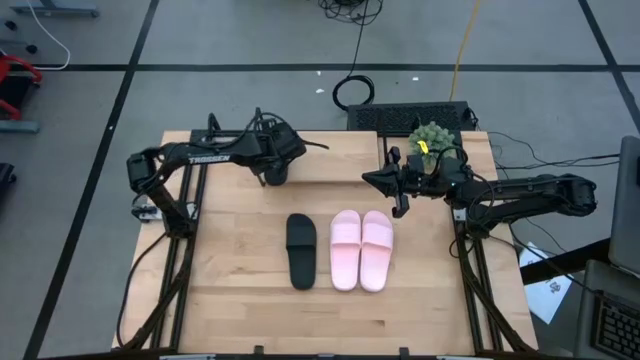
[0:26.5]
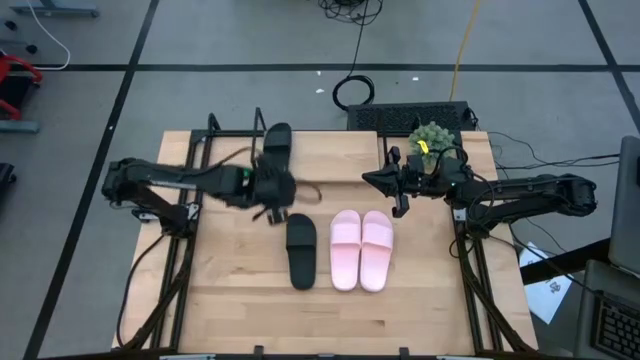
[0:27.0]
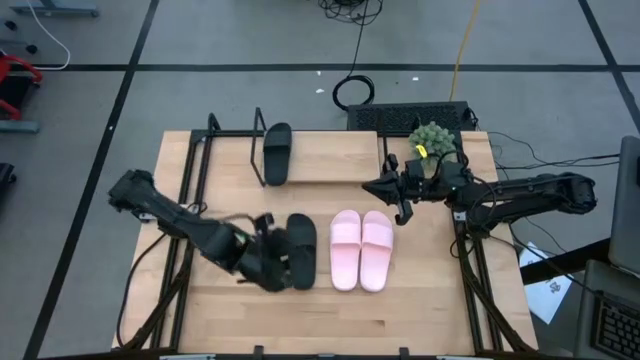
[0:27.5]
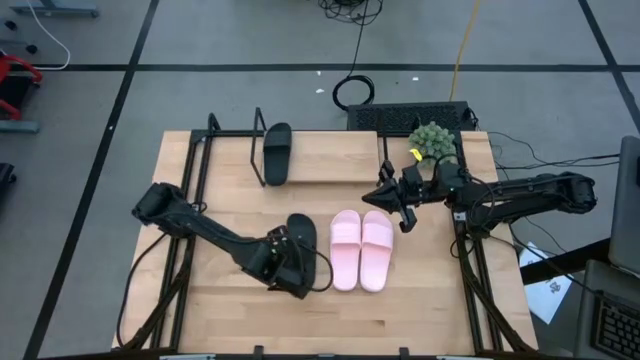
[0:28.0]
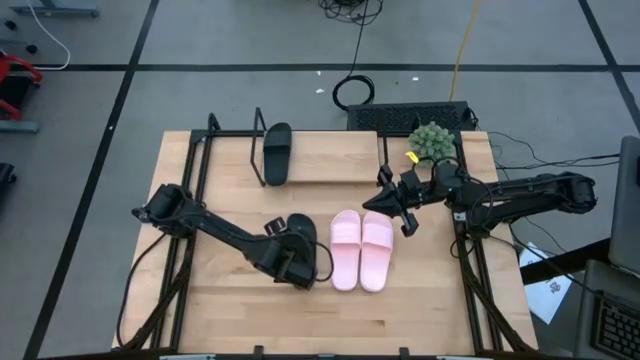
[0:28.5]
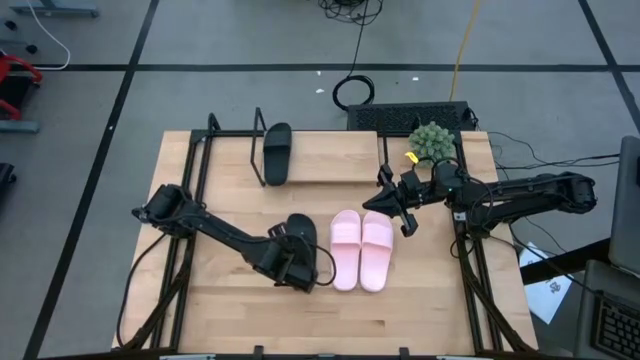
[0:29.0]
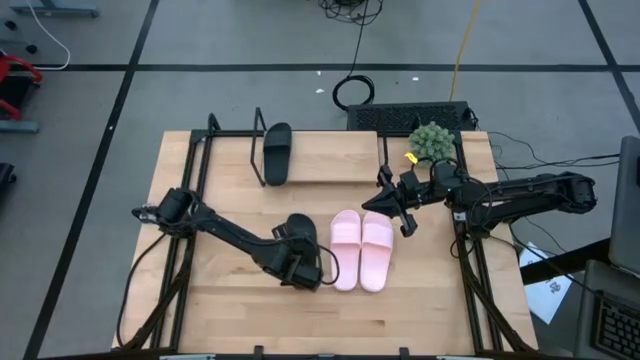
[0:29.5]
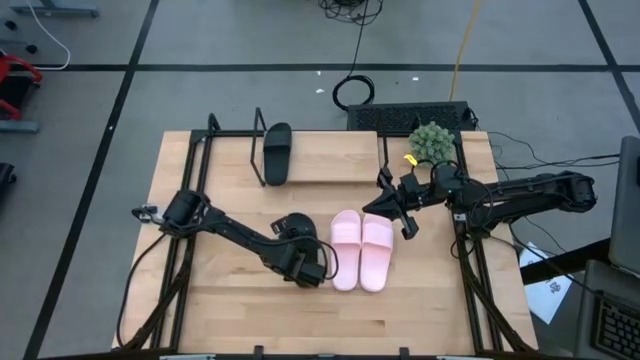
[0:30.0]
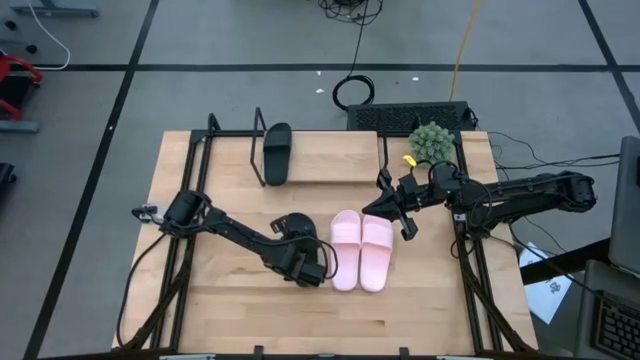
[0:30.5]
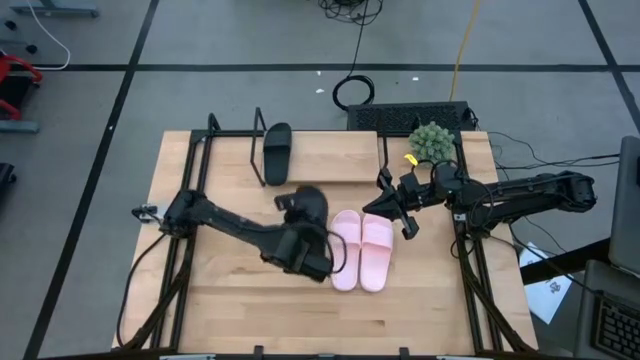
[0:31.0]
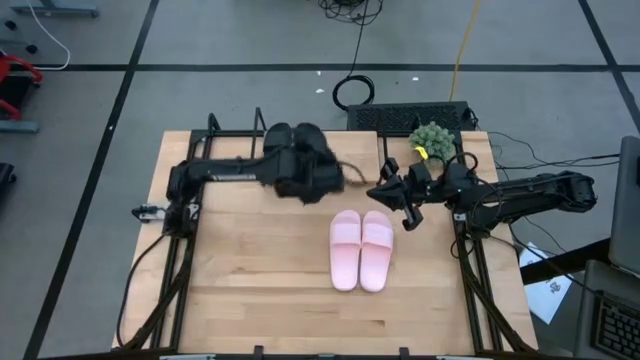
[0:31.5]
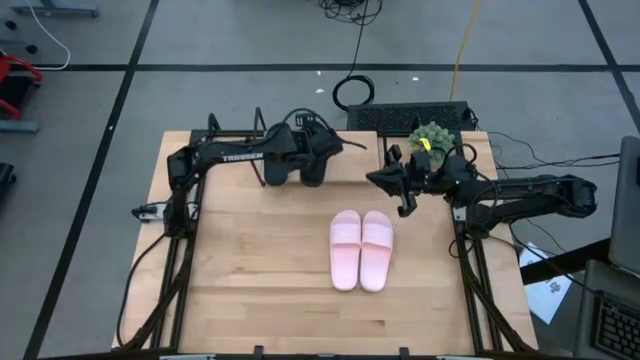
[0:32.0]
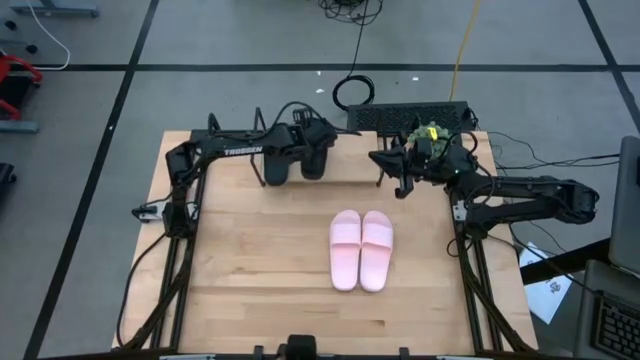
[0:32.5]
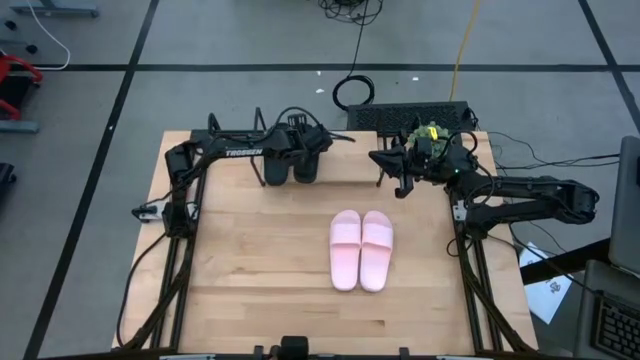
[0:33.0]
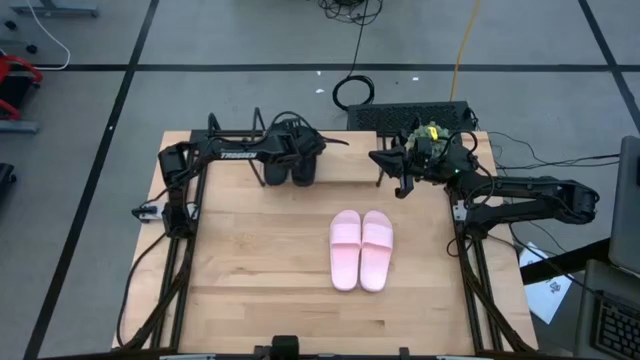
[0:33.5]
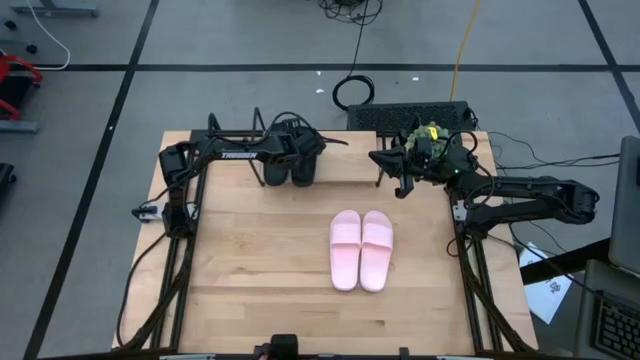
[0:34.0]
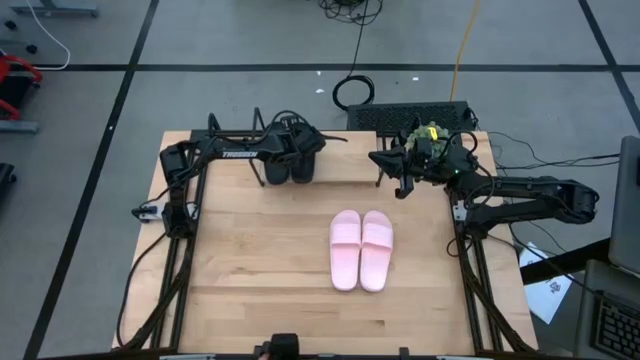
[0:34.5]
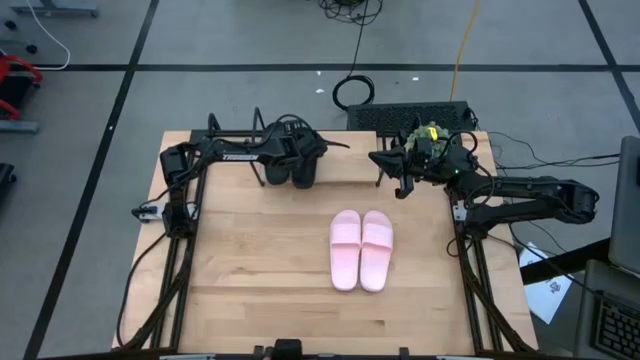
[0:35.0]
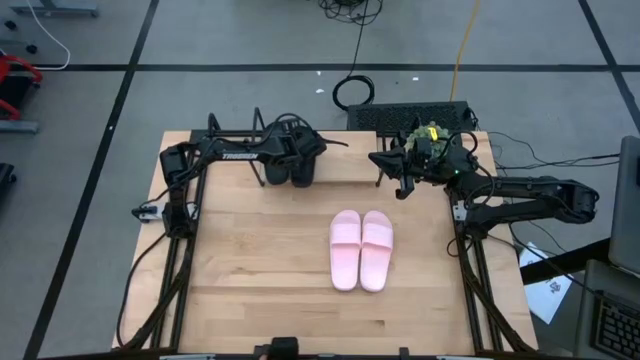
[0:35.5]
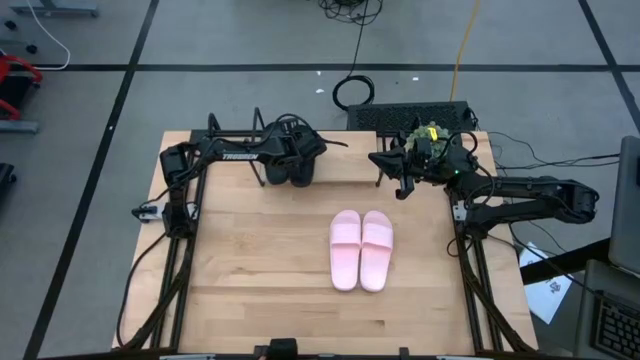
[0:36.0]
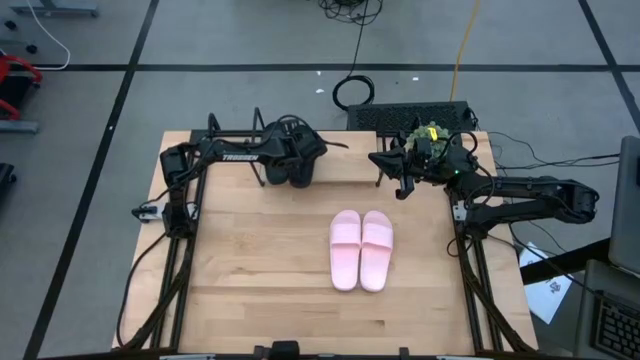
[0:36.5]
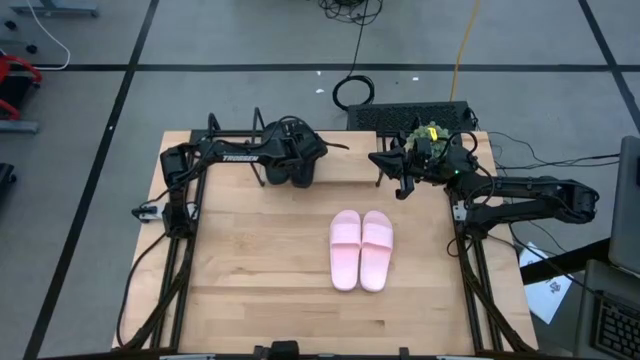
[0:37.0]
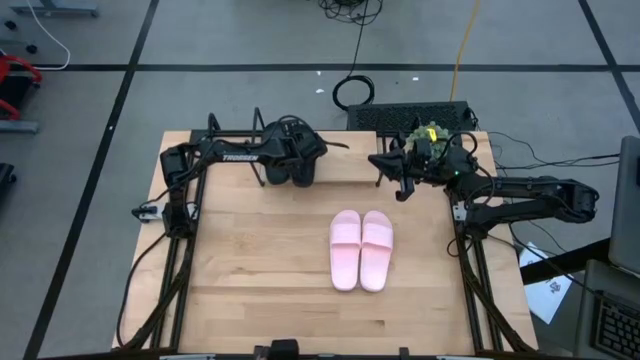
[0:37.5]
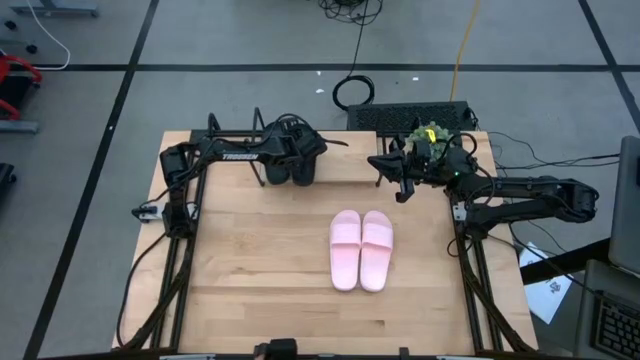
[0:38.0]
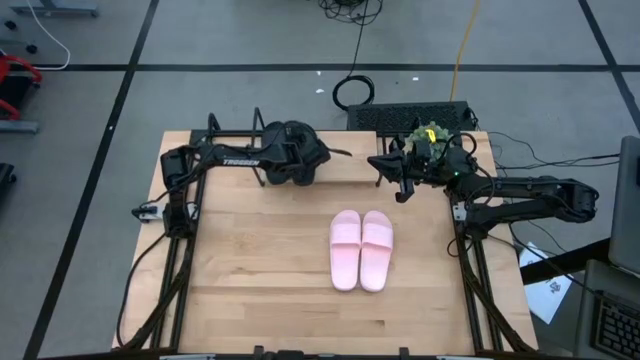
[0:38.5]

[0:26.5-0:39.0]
Task: Pick and place slides into the shelf
Put the black slide on the shelf

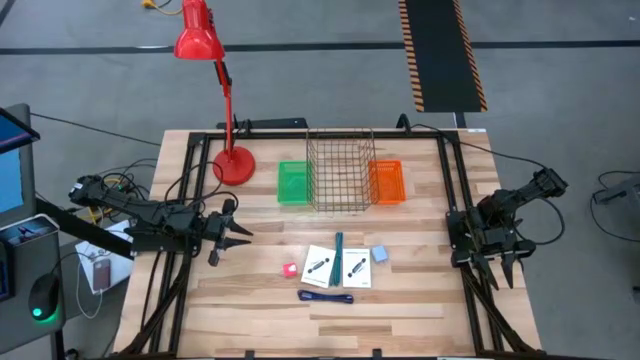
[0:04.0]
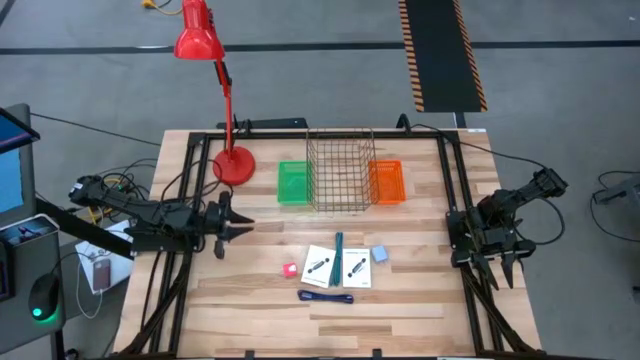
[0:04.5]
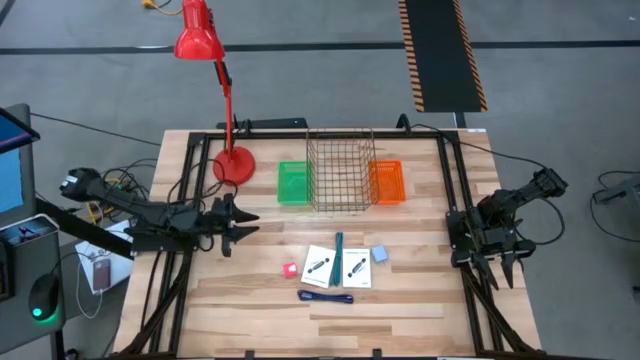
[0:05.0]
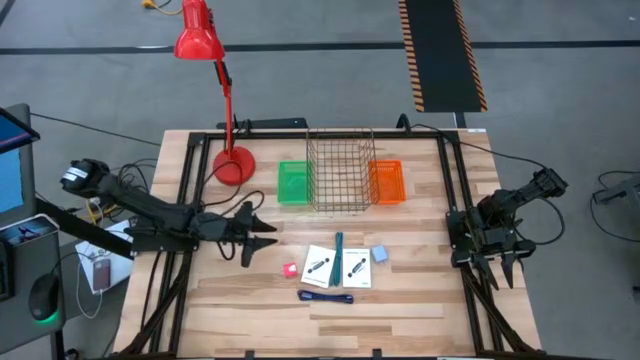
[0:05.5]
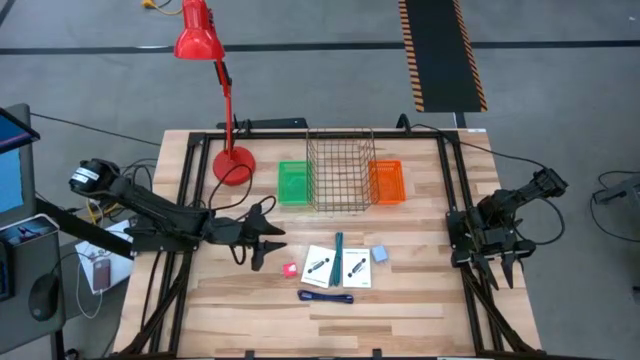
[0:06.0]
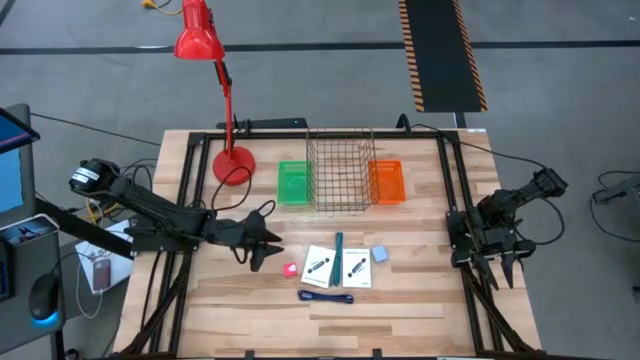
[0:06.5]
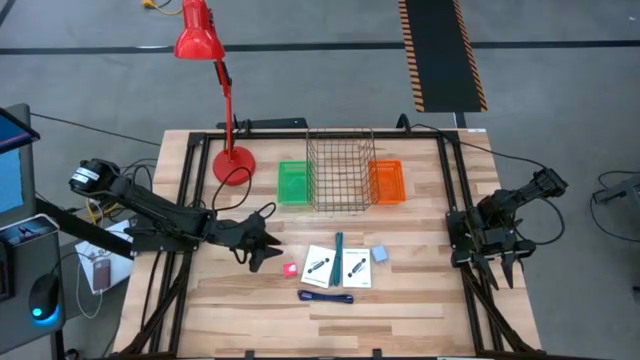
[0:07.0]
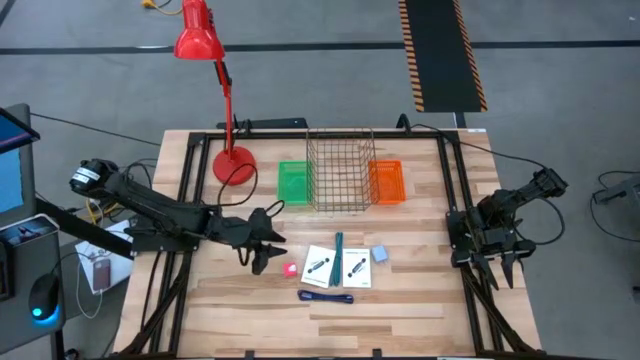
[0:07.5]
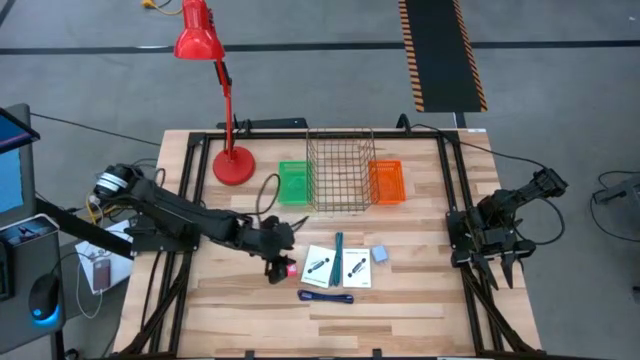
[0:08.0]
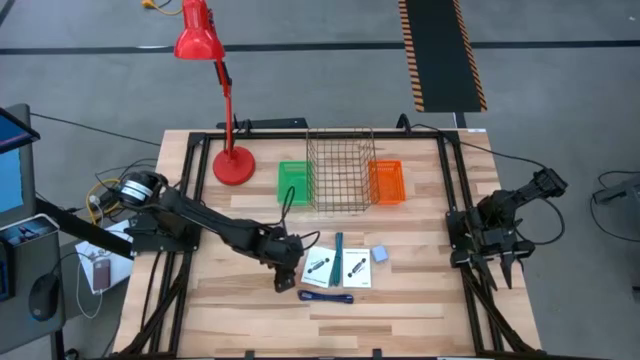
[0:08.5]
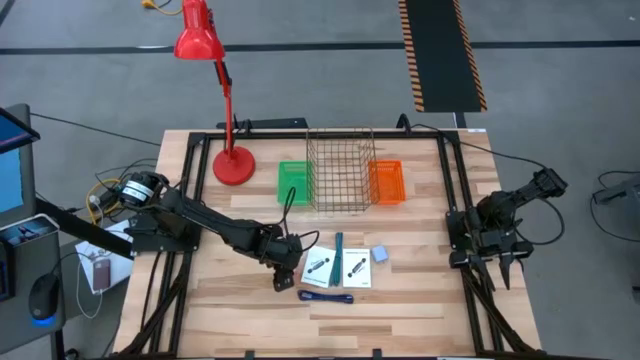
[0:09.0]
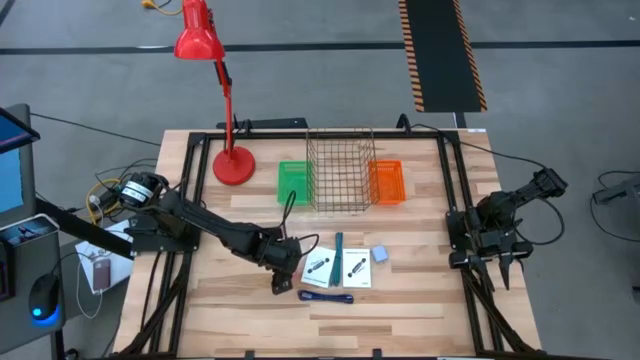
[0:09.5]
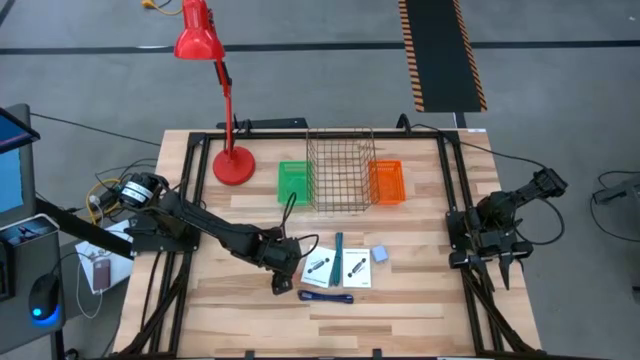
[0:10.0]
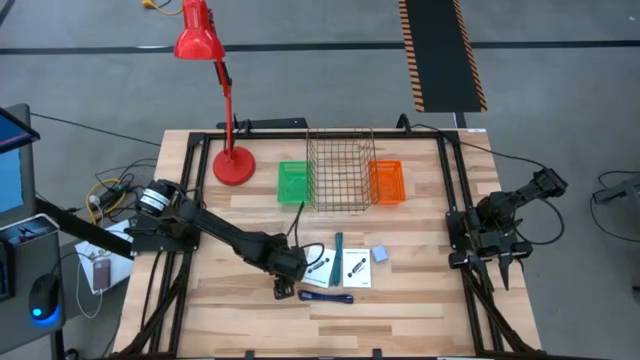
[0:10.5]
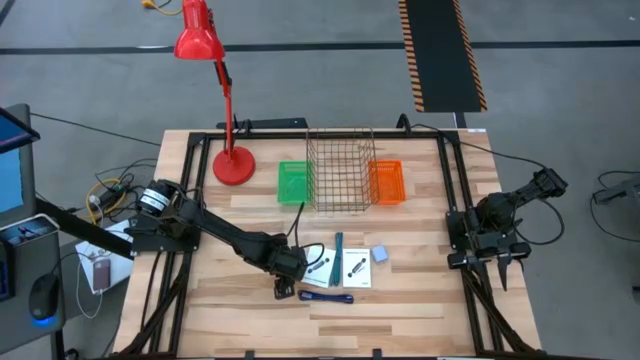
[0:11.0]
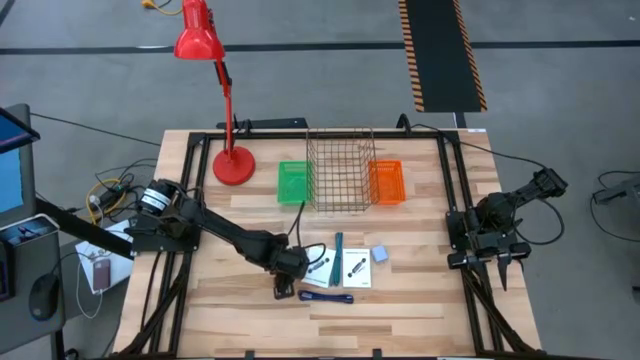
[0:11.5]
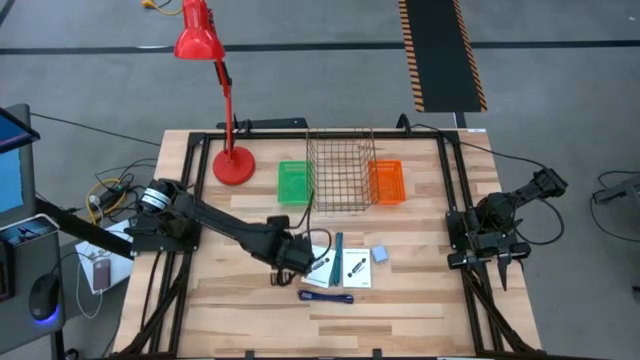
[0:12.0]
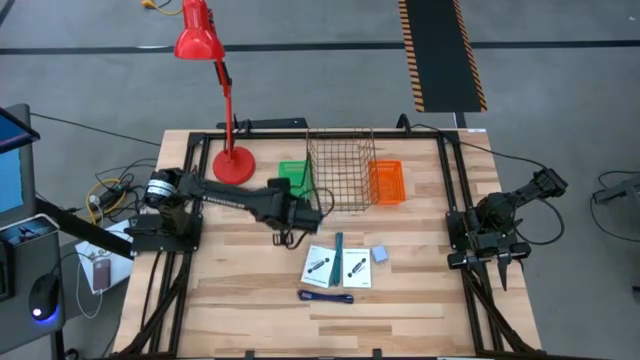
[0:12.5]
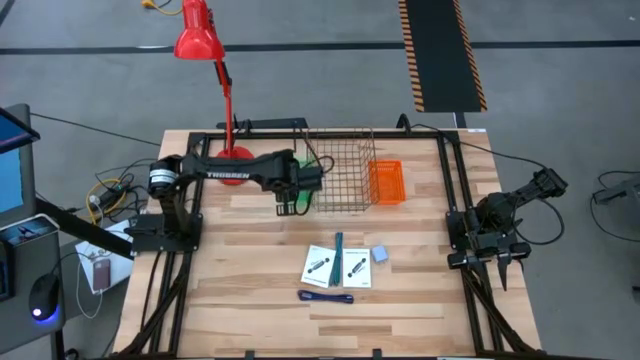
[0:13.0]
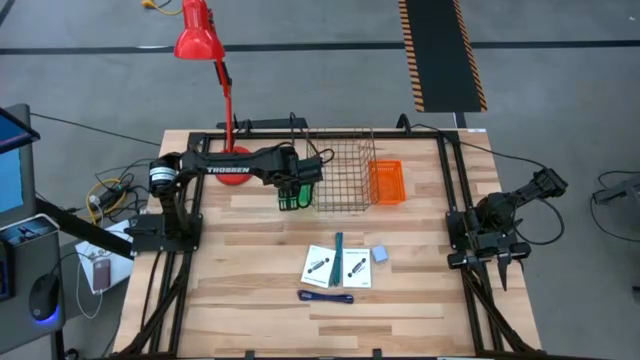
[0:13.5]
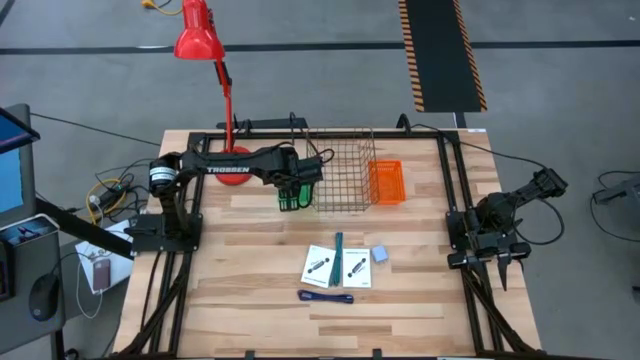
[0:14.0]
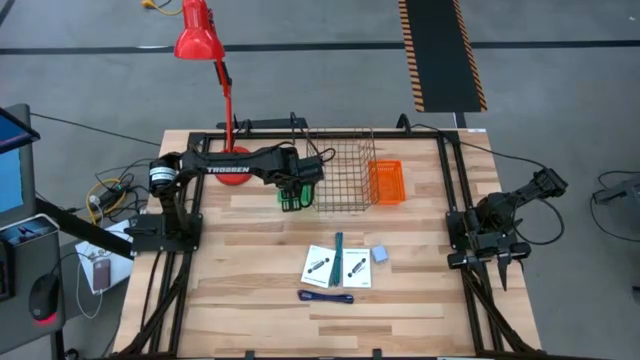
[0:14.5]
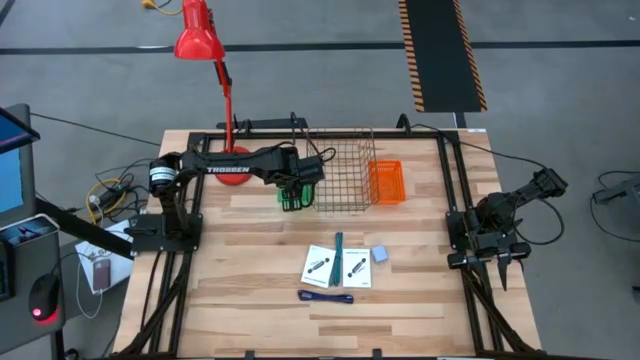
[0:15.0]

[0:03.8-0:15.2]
Task: Pick and place items into bin
Put the pink charger adapter into the green bin
